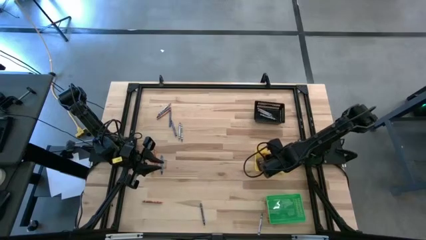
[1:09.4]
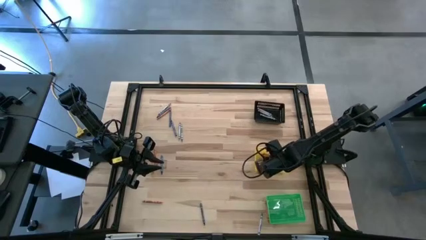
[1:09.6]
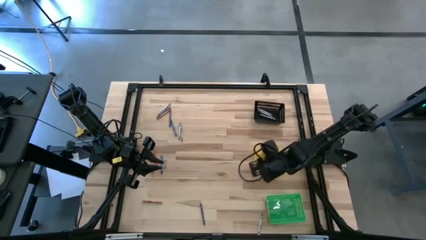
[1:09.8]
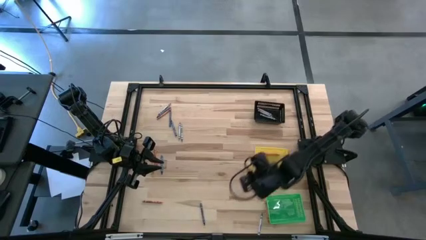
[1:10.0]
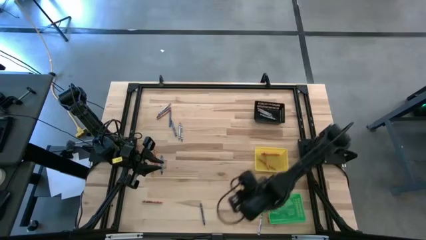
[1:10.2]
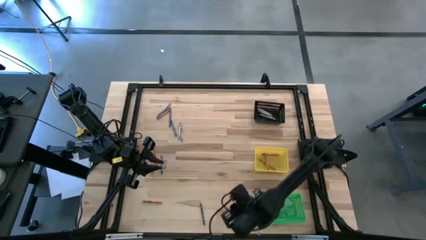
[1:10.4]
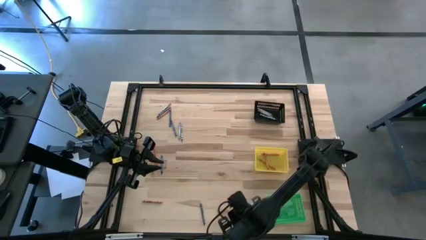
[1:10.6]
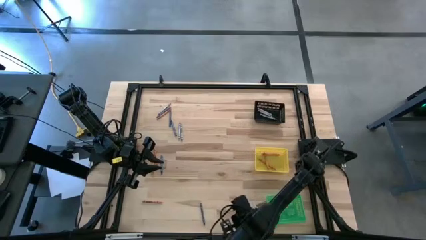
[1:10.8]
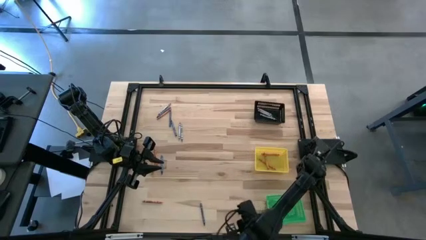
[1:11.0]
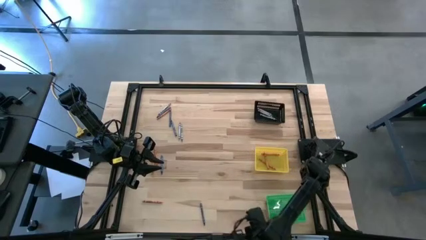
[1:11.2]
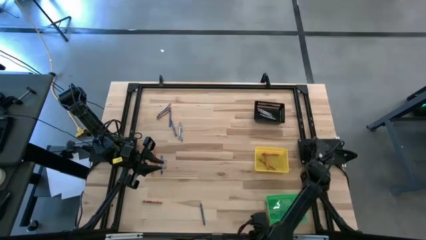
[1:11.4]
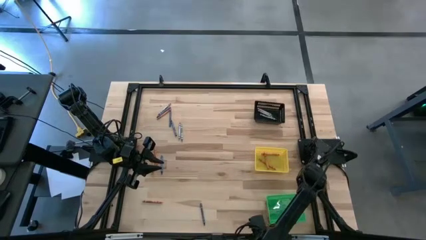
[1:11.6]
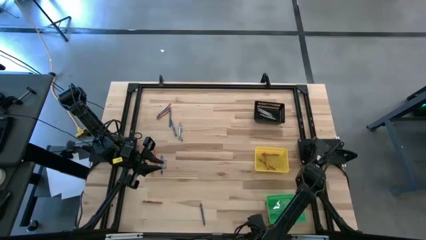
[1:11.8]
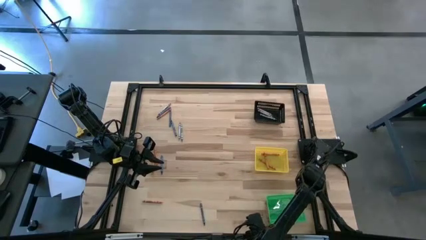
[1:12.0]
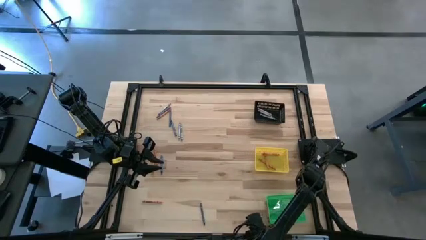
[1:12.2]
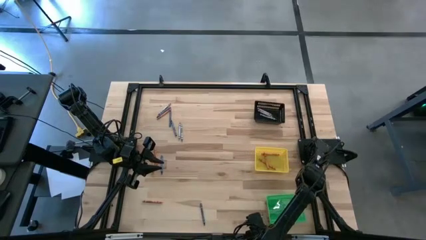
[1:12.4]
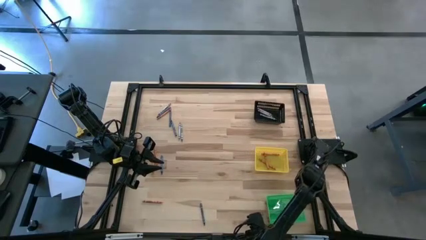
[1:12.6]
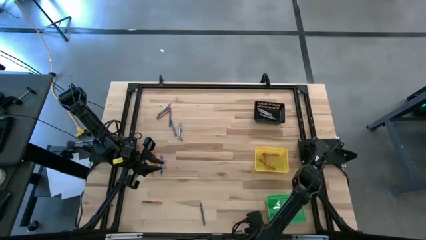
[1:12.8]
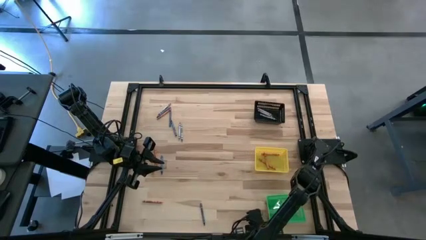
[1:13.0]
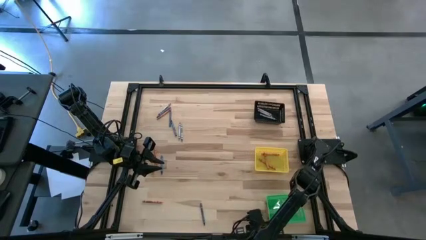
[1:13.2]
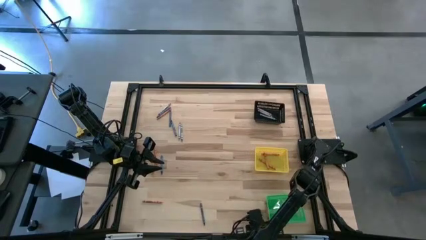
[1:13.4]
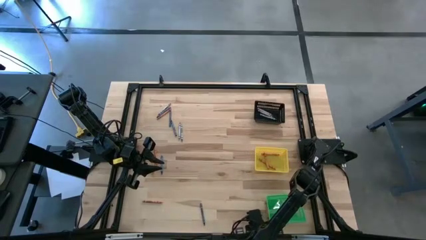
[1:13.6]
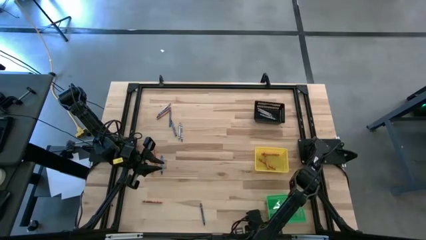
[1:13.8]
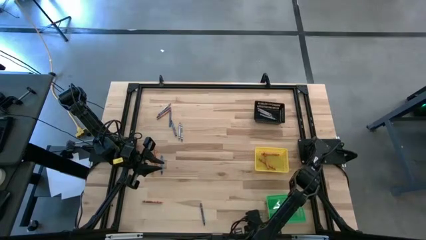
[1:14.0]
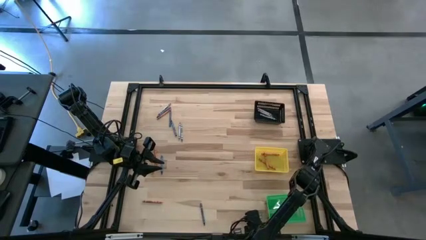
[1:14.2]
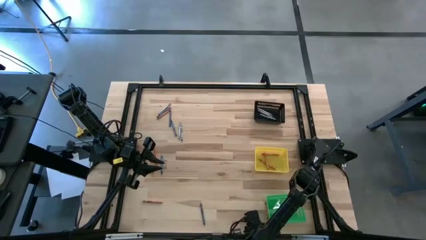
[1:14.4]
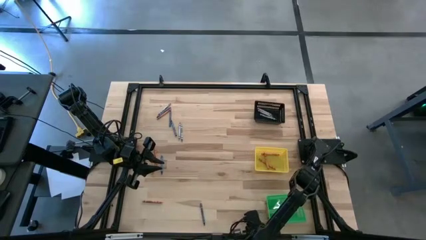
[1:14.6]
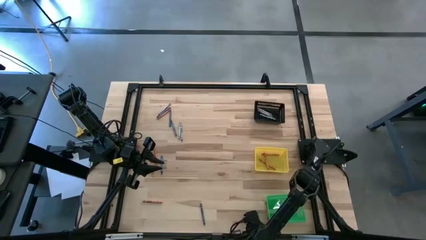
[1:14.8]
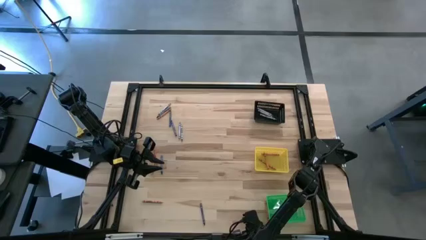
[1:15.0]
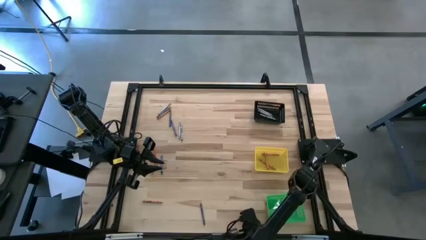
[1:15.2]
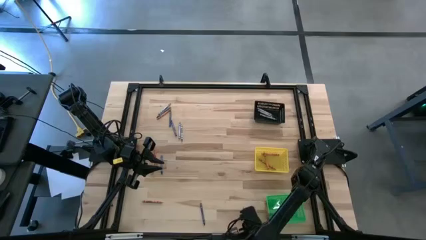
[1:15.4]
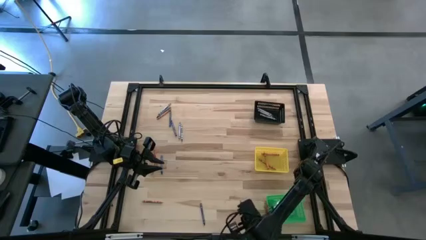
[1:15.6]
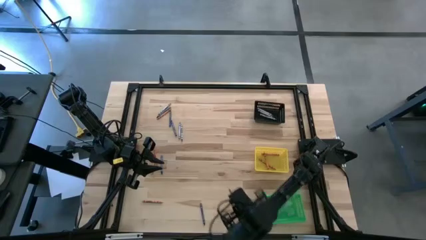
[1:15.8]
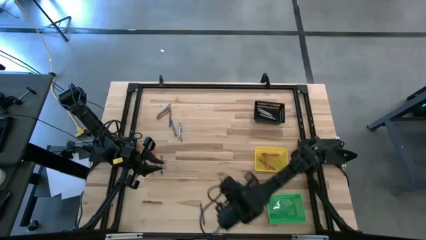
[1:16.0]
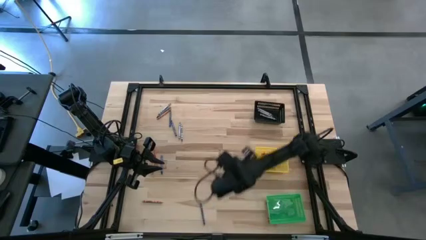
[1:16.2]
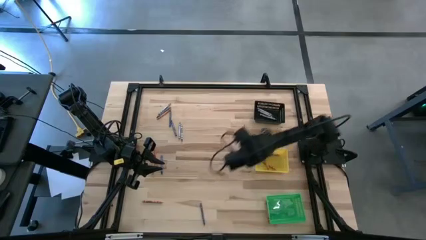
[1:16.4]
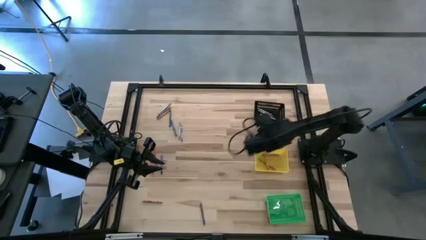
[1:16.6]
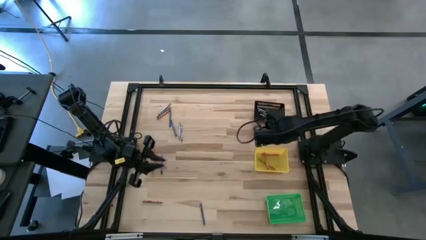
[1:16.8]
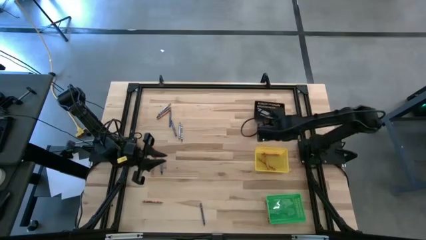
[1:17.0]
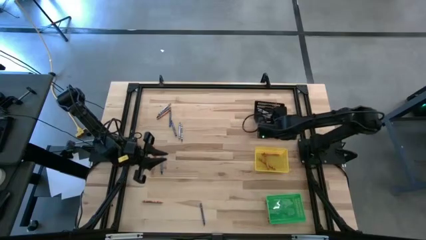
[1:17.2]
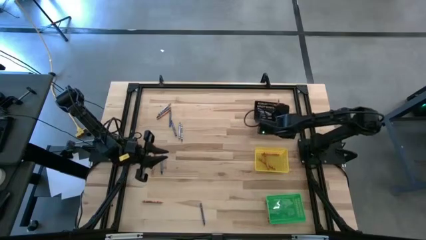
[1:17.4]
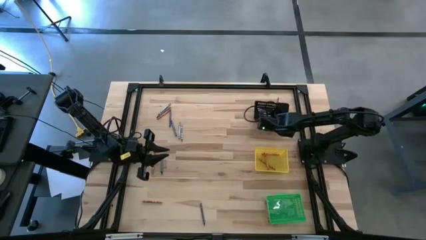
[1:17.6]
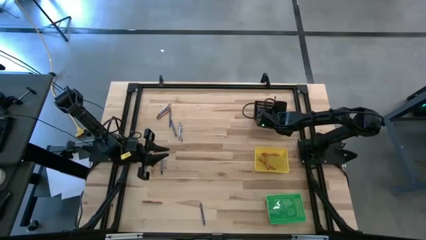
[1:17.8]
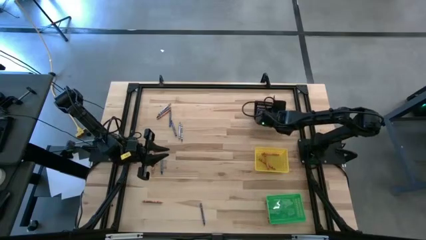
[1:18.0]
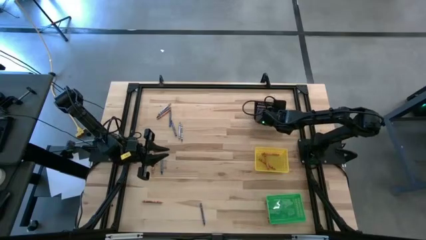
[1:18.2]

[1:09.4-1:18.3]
Task: Sort crayons
Put the gray crayon into the black basket

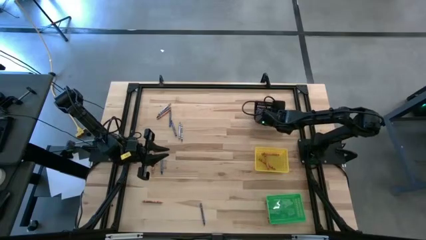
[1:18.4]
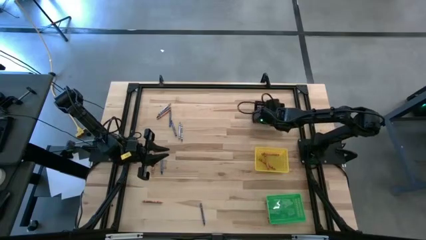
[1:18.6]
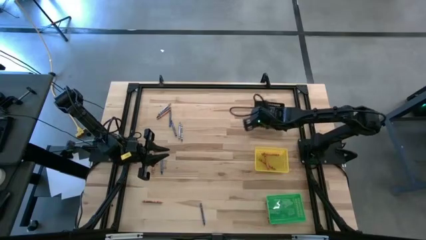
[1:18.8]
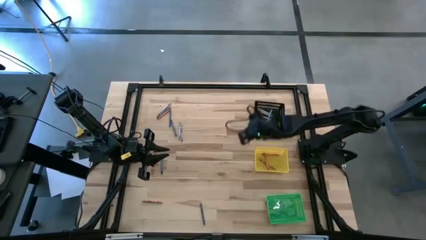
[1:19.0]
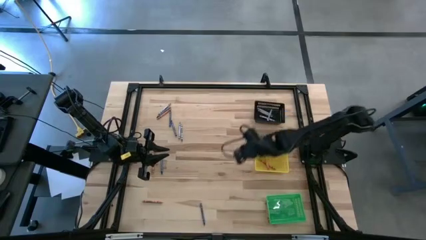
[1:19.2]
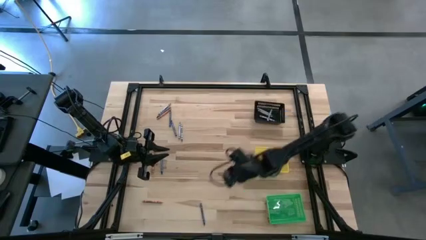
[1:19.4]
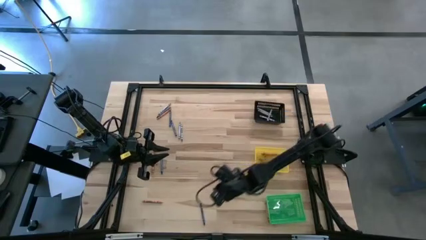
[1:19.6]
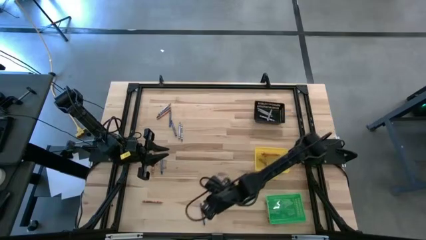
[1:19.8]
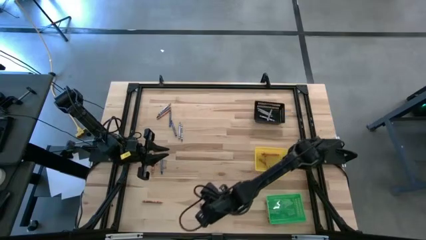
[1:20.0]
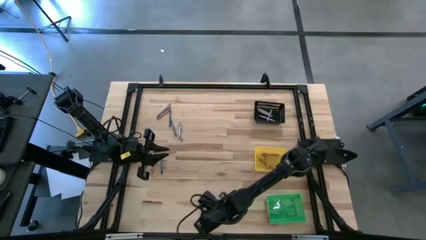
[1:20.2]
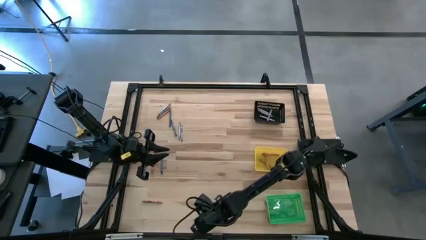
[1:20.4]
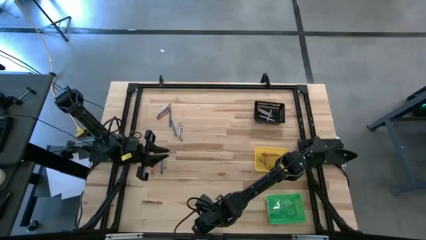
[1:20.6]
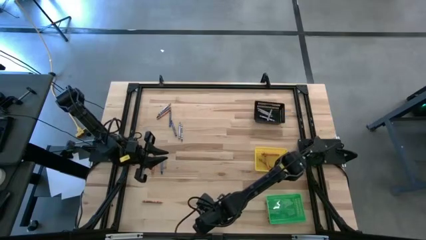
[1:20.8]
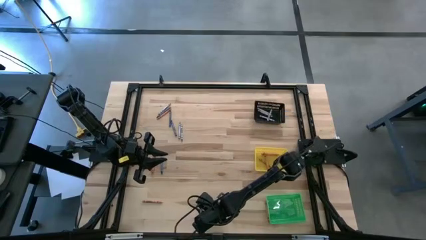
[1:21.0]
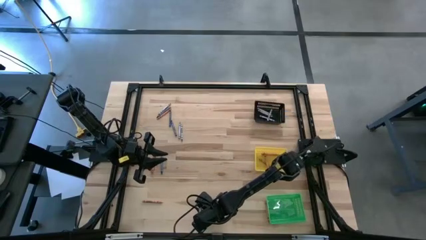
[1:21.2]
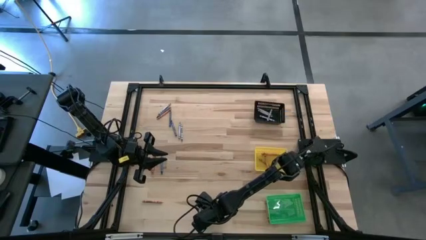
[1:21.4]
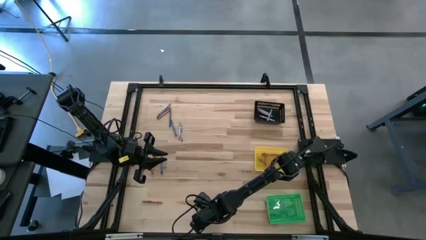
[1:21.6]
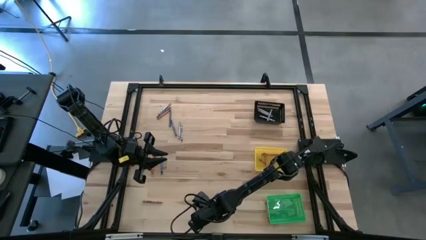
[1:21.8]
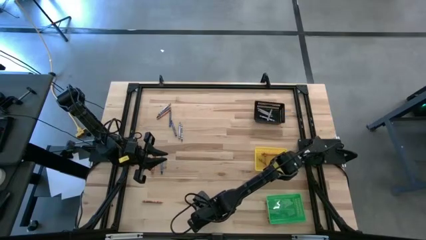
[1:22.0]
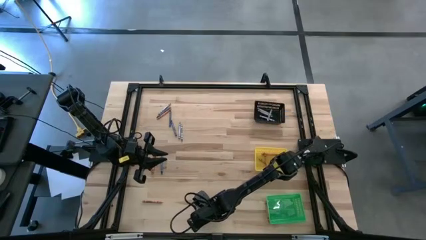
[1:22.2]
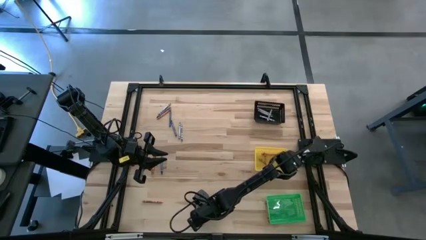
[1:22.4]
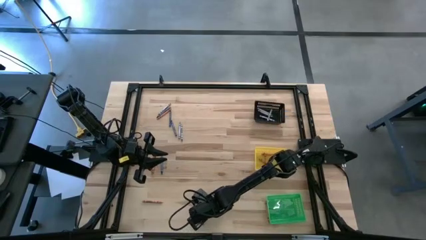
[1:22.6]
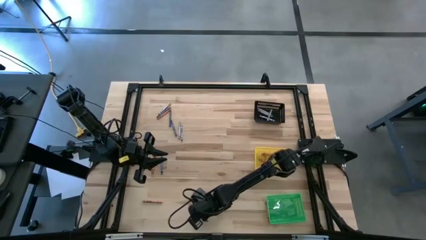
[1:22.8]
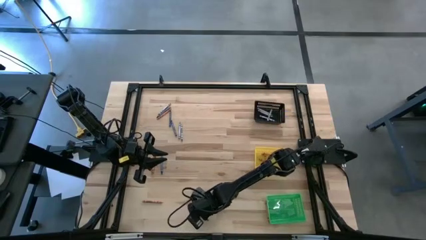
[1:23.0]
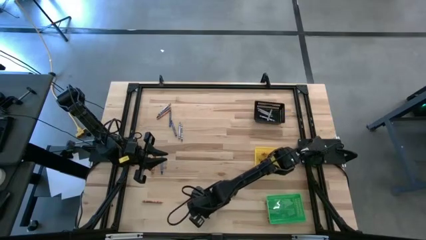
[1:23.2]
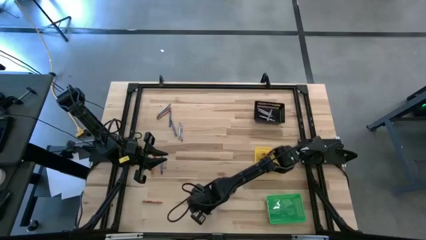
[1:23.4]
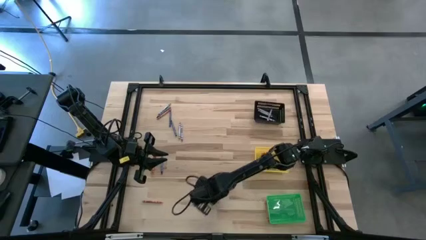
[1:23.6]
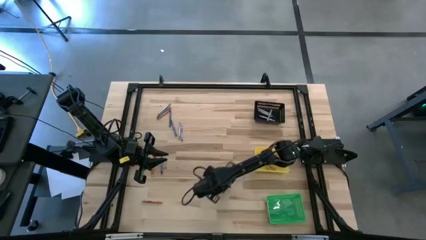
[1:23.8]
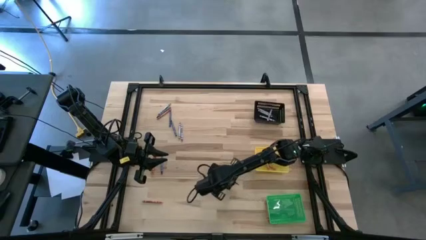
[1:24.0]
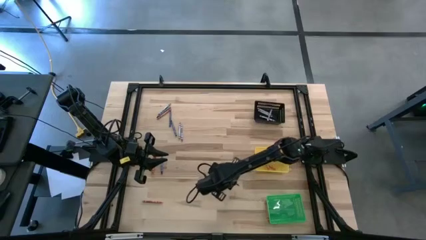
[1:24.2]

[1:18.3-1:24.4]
Put the blue crayon into the green basket

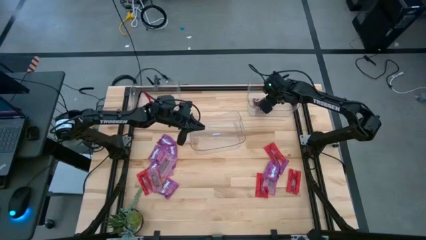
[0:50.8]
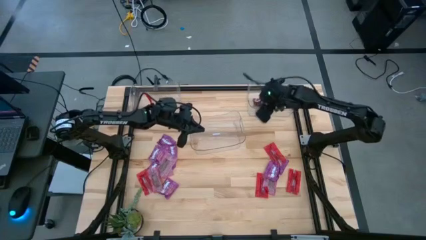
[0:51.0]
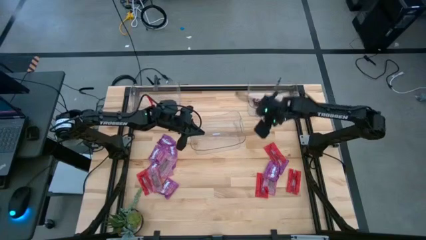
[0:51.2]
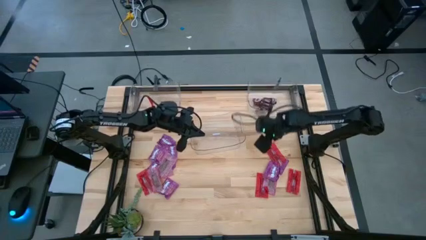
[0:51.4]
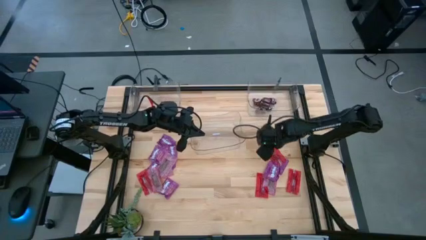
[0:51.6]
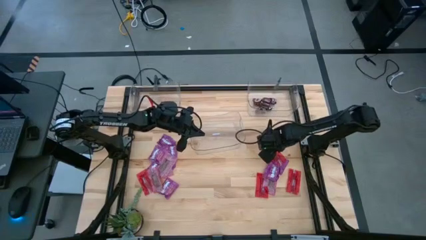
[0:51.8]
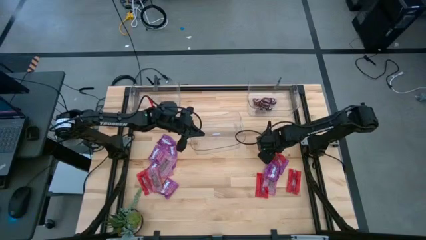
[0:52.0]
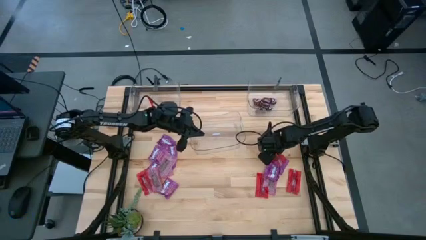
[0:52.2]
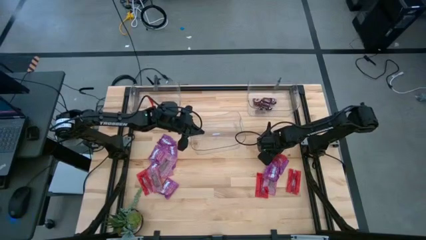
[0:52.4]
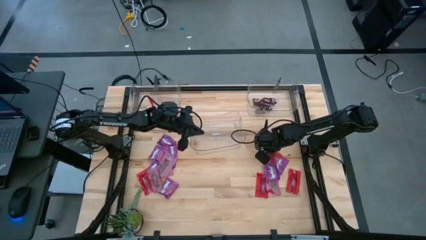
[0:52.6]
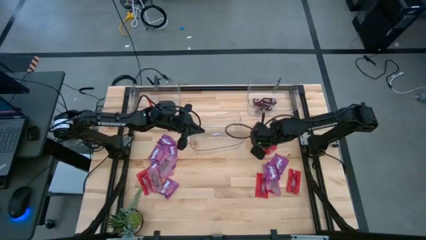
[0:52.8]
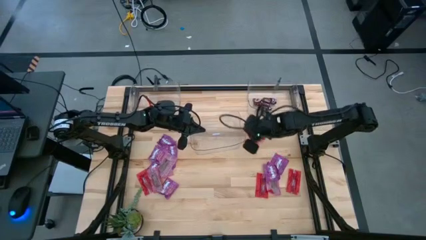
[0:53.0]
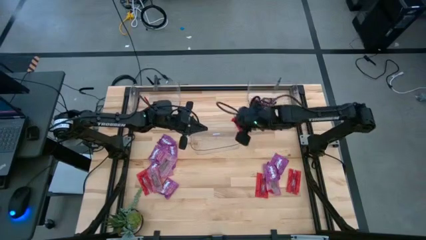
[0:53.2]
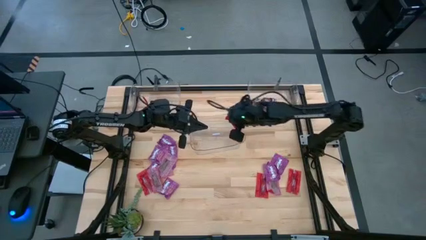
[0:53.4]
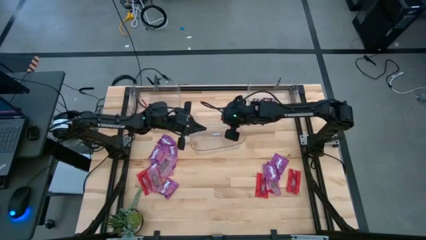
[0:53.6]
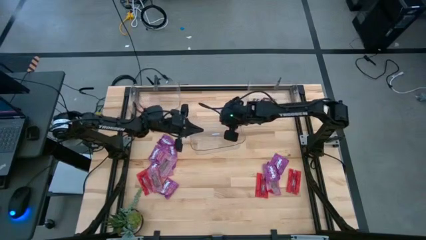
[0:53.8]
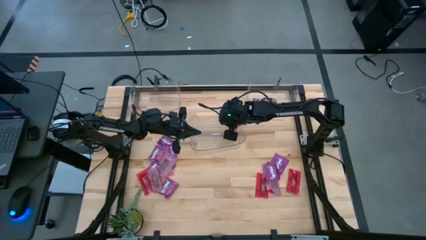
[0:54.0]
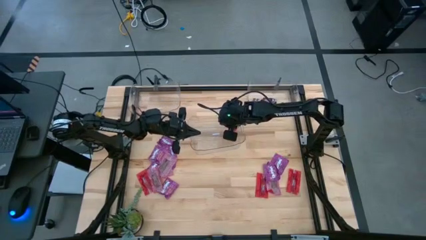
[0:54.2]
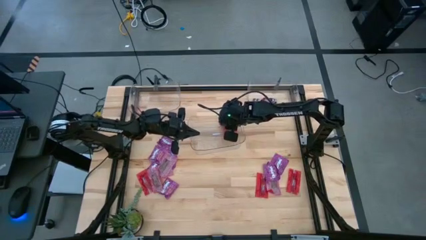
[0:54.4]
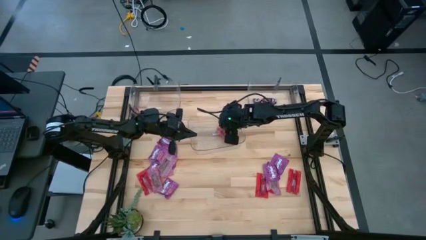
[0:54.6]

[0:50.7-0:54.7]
Task: Sort candy
Put the red candy pack into the bottom transparent bin
